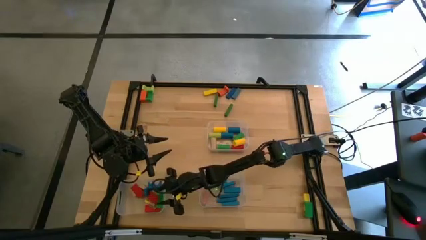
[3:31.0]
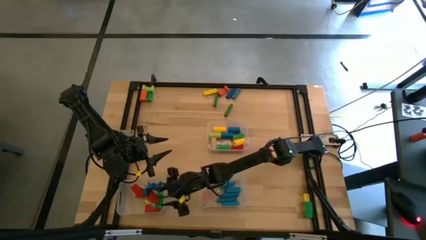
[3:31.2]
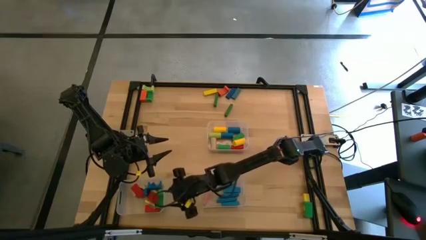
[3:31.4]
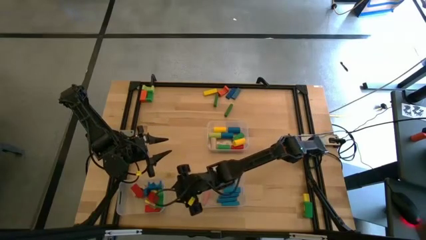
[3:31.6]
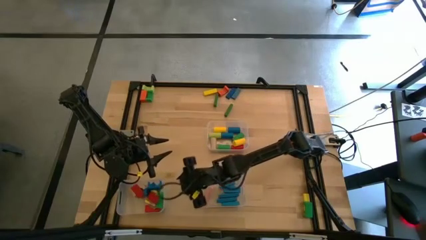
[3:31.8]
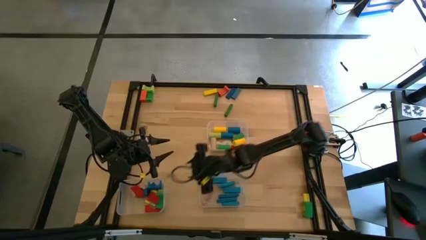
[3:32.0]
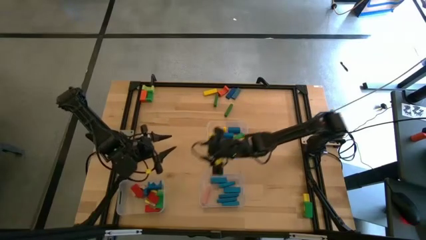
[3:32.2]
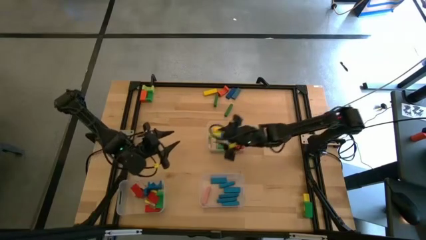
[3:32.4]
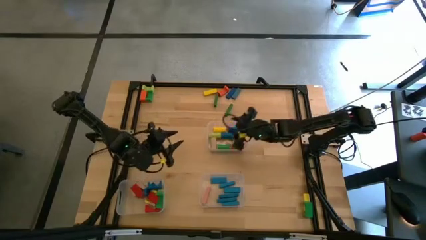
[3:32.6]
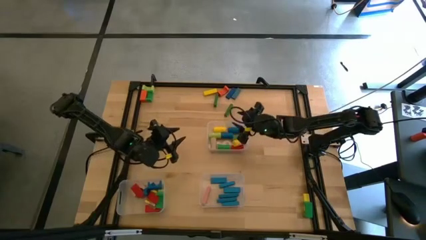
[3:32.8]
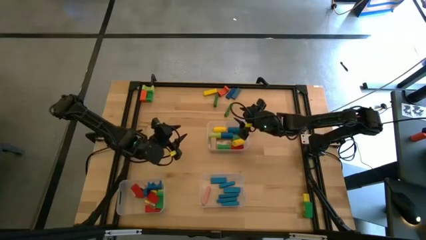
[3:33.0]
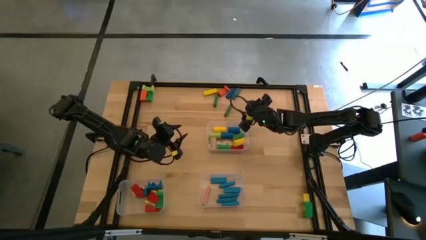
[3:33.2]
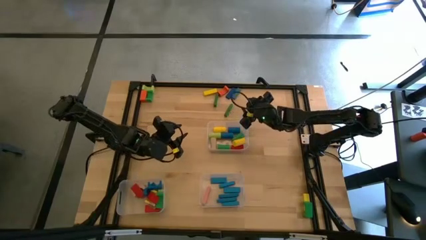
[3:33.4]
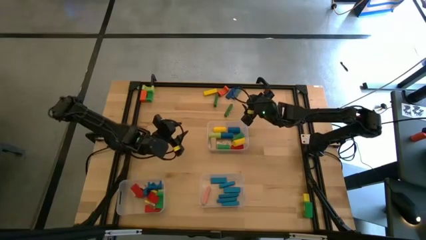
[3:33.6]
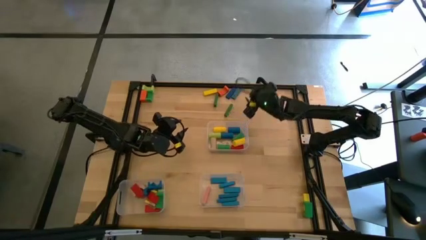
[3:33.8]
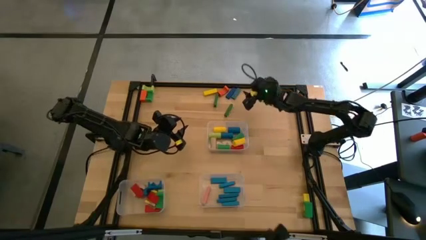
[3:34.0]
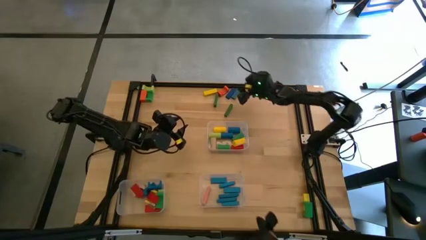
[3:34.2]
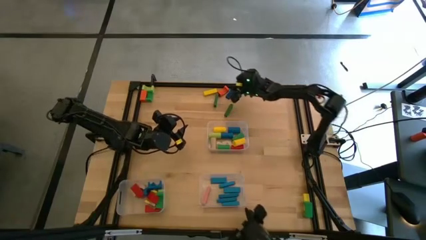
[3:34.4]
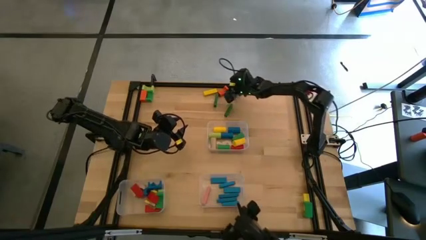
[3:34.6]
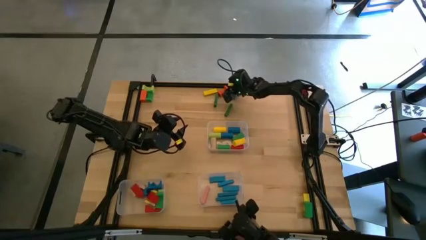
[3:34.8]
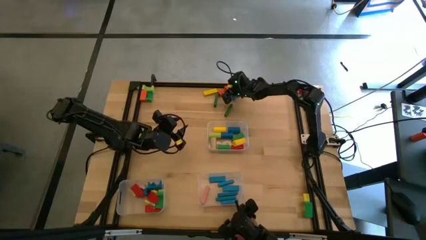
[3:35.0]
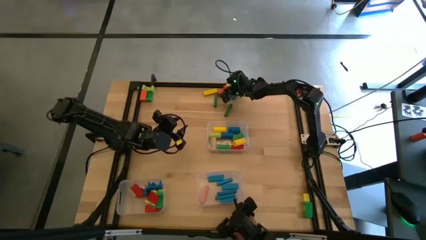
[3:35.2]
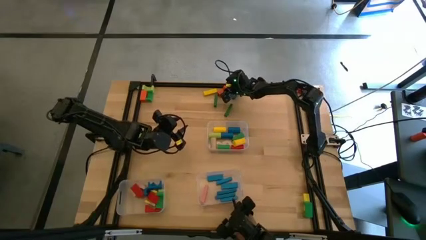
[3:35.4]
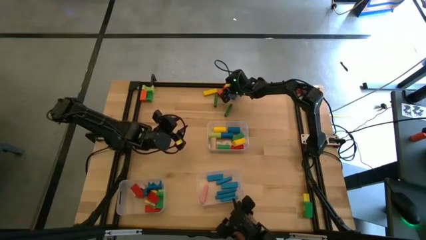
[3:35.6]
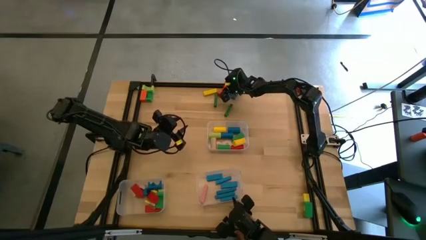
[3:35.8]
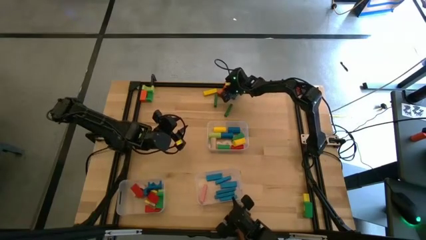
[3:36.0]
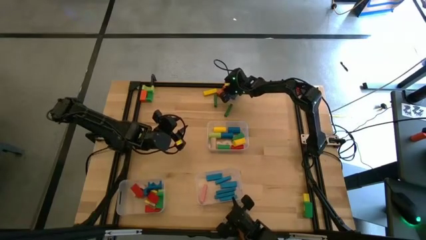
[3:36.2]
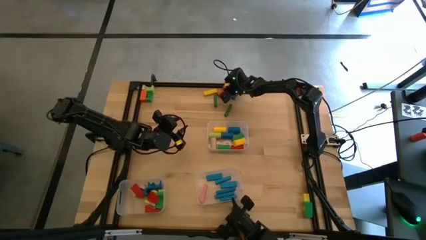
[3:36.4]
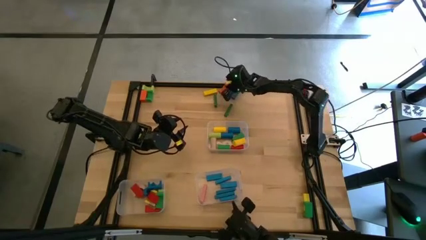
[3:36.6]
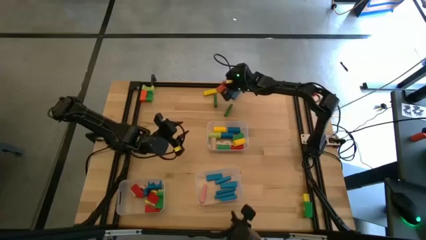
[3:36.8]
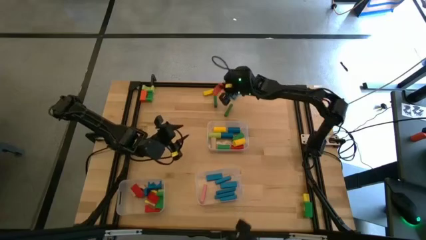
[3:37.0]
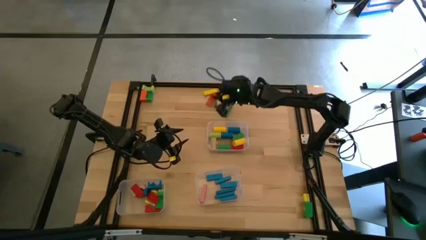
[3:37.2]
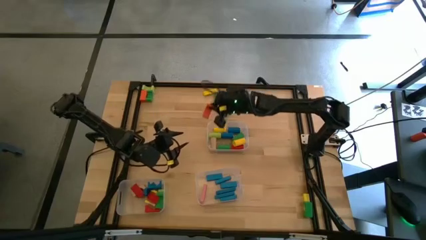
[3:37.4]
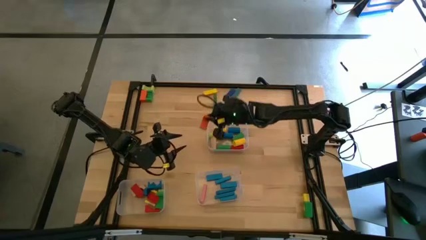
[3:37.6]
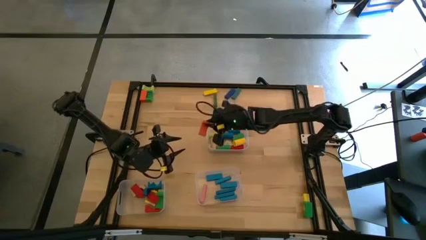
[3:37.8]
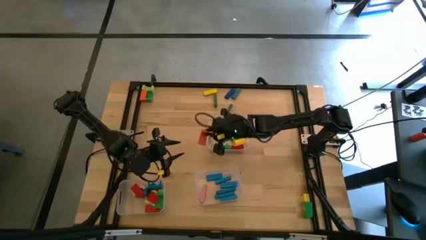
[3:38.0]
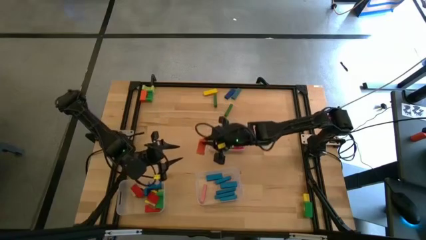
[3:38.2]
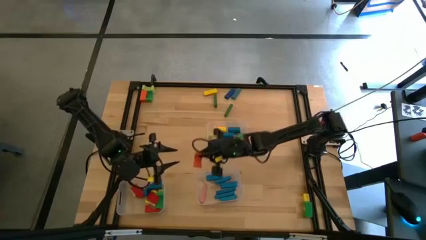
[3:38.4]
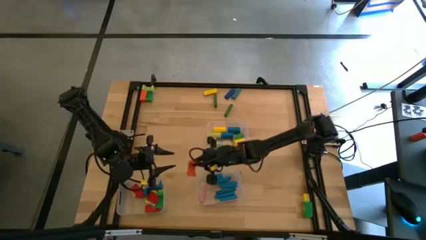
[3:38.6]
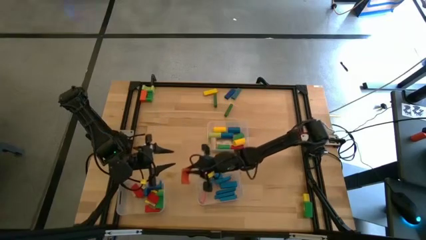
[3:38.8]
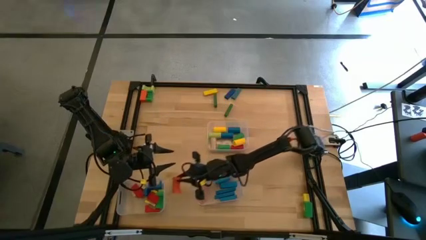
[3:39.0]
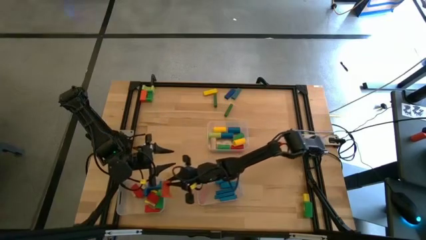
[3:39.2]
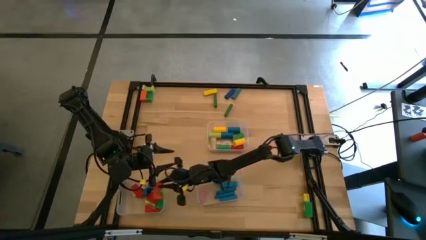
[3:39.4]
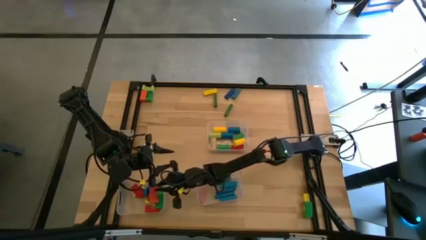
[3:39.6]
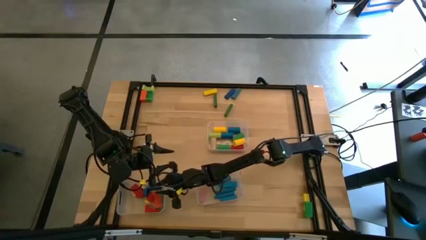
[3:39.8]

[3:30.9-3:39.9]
Task: Sort blocks by size
Put the orange arch block into the bottom left transparent bin

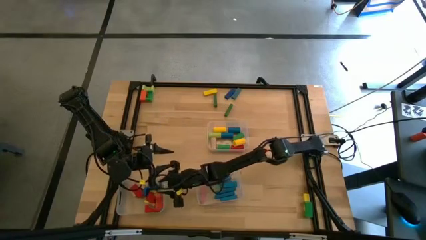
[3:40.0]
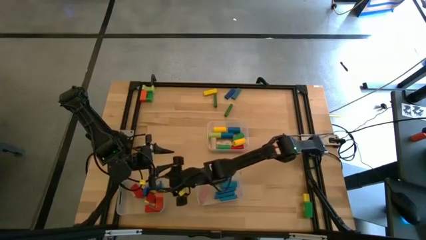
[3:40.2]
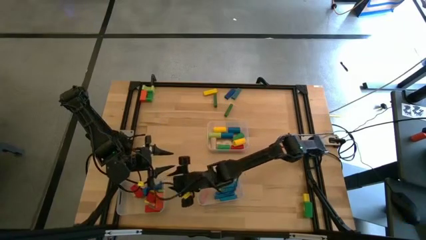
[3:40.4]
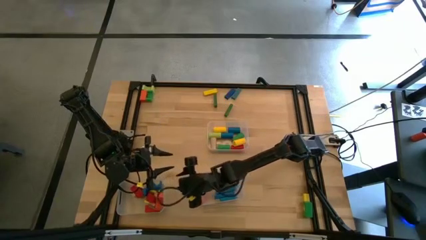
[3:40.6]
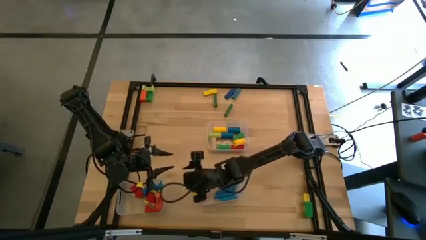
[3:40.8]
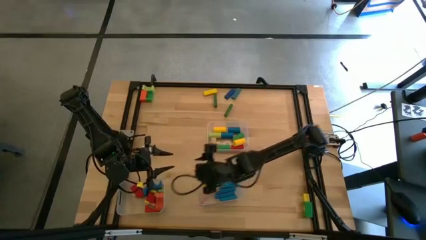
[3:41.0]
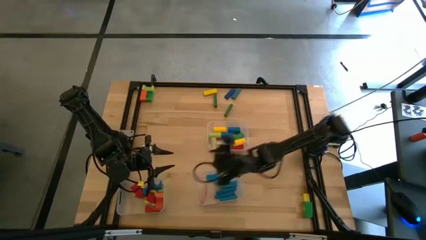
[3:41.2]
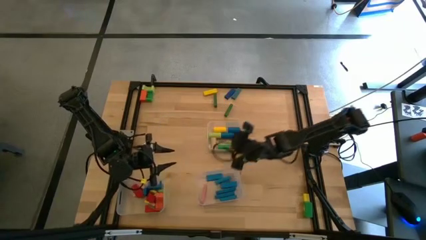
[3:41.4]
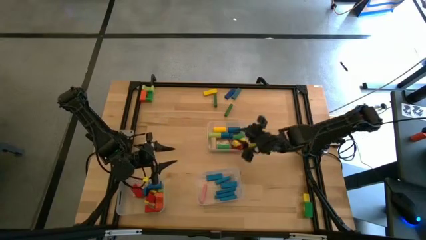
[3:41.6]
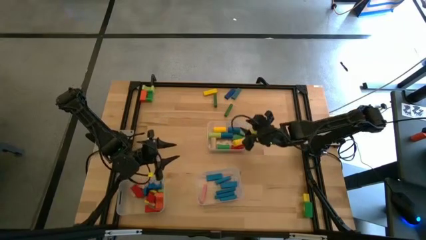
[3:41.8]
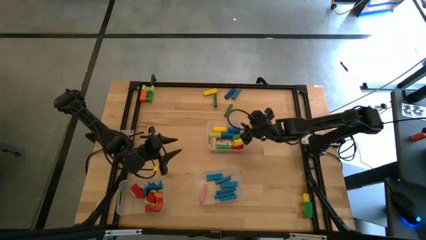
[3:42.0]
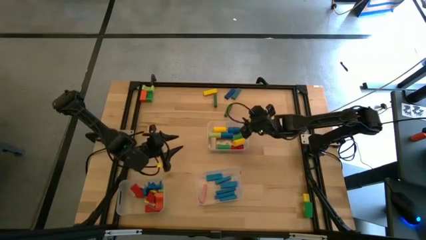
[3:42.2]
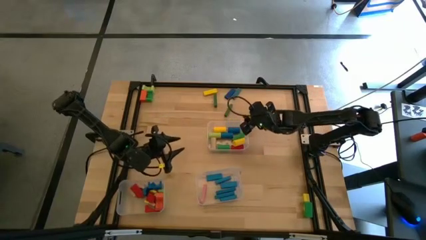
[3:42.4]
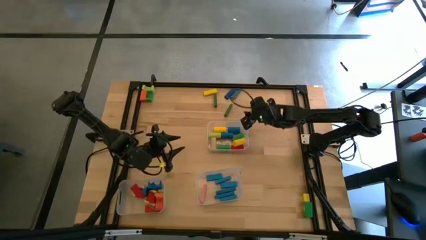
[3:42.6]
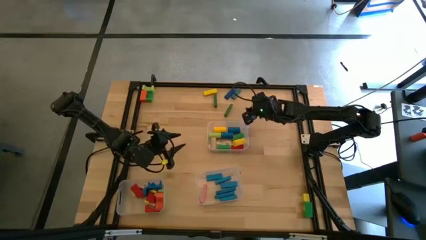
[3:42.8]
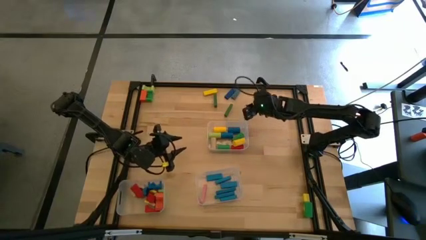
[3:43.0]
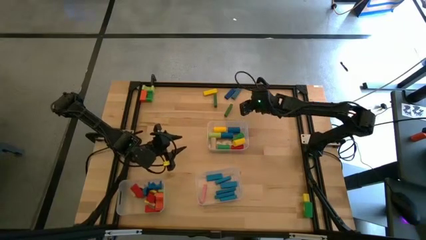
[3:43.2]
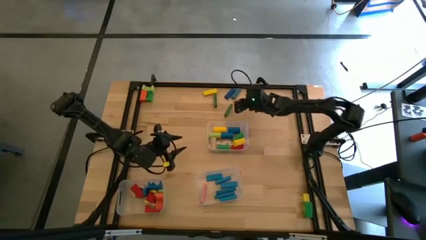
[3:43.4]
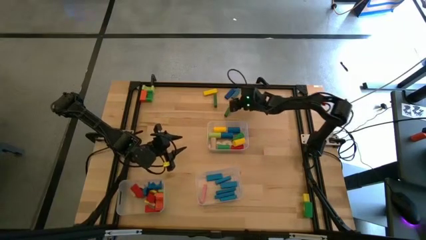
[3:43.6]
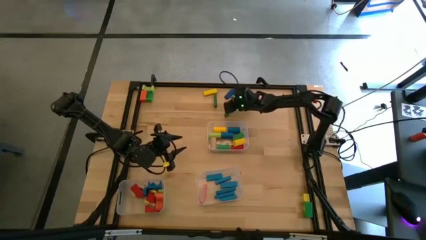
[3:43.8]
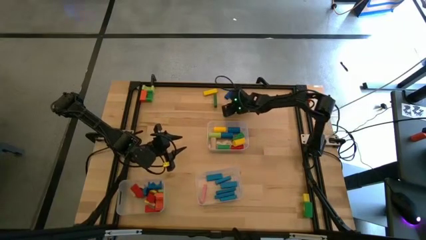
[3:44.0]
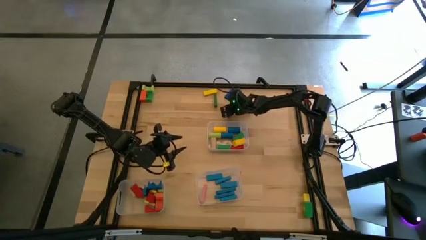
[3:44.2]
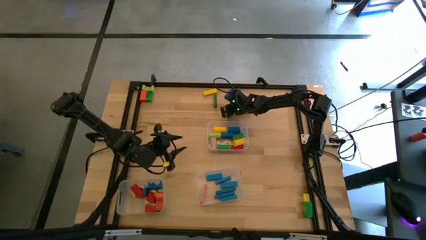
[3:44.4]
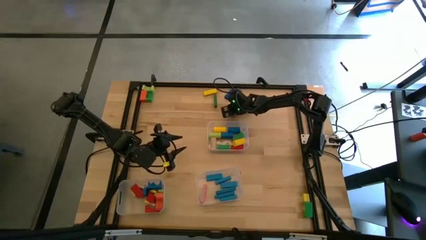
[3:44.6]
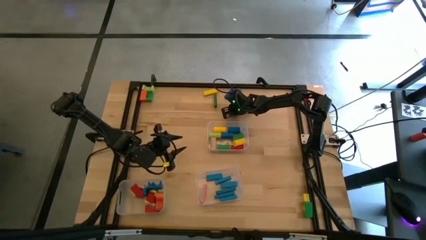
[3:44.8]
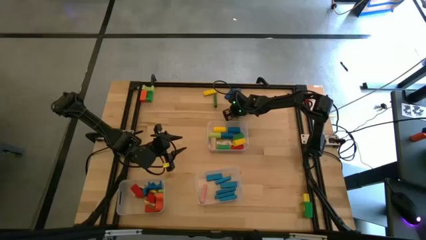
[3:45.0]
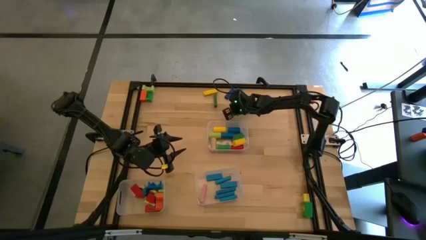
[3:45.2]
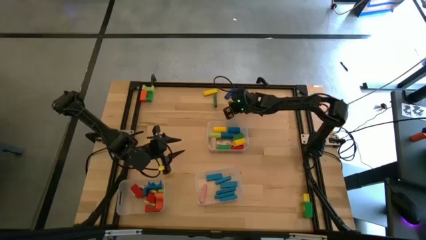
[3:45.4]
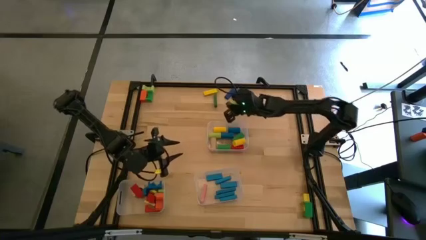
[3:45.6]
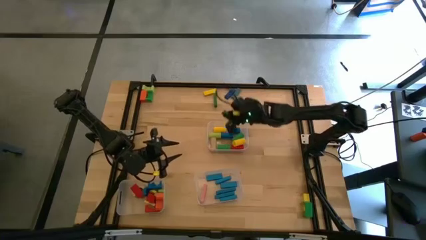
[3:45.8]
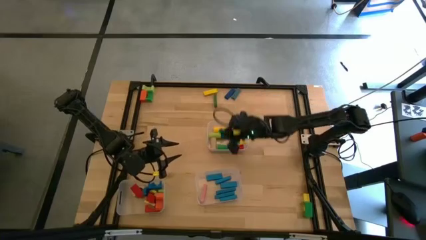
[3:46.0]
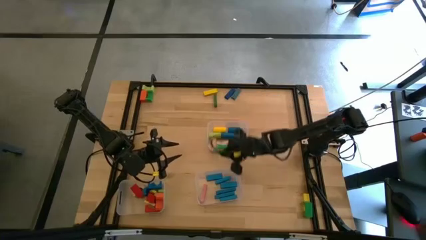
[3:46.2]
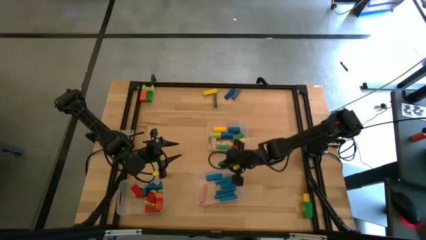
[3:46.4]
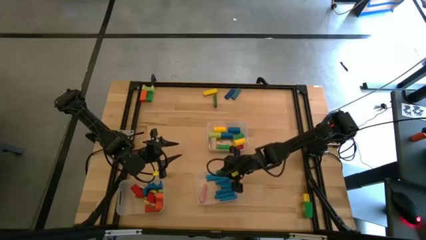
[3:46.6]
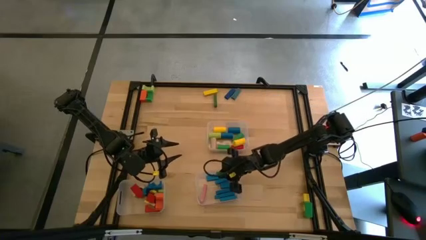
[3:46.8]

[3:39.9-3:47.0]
Put the green rectangular block into the bottom right transparent bin
